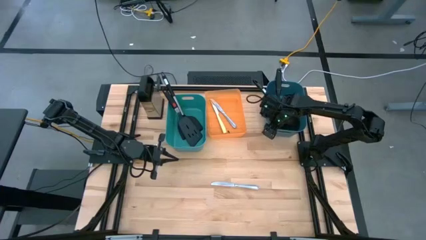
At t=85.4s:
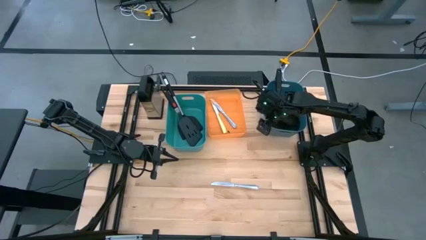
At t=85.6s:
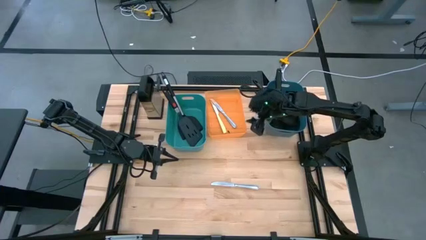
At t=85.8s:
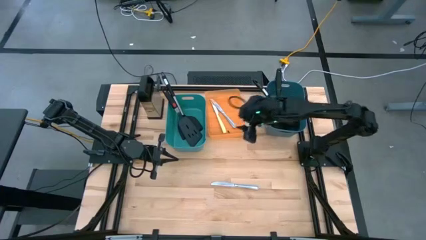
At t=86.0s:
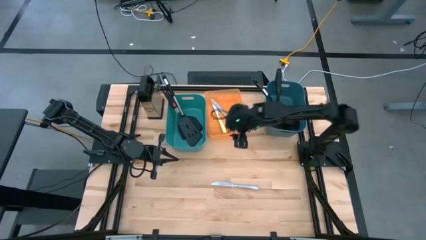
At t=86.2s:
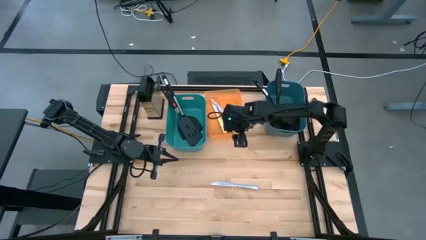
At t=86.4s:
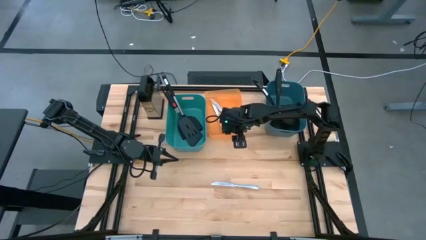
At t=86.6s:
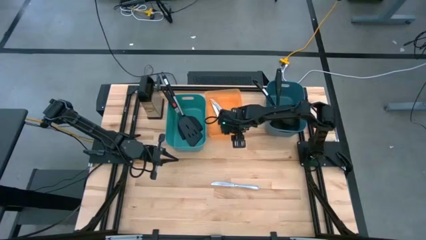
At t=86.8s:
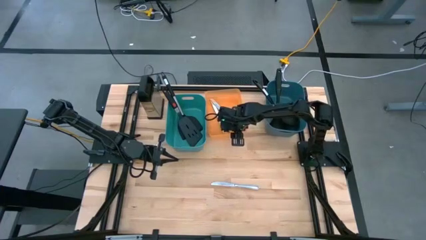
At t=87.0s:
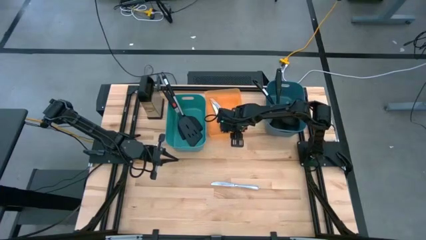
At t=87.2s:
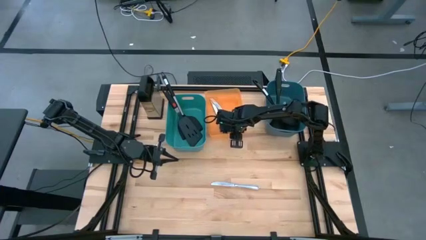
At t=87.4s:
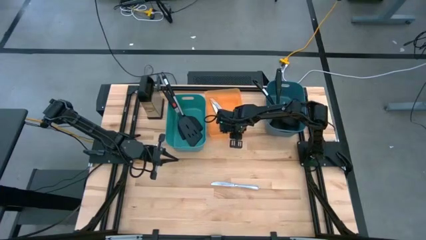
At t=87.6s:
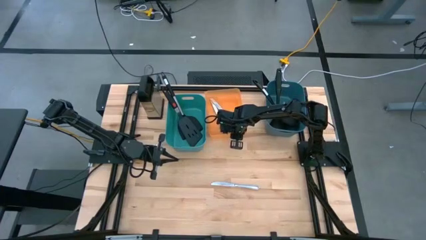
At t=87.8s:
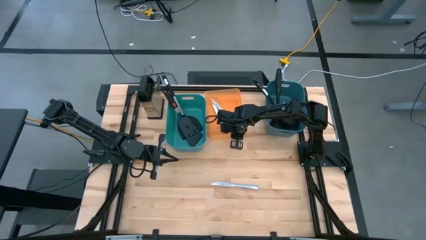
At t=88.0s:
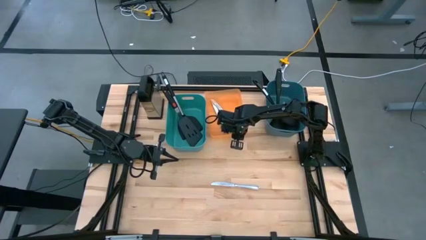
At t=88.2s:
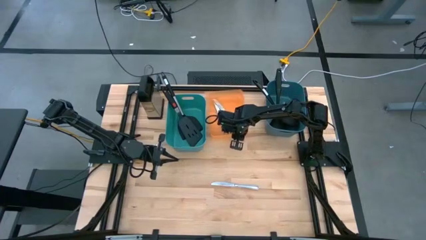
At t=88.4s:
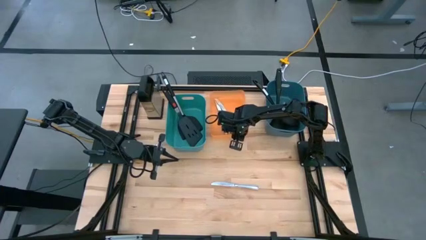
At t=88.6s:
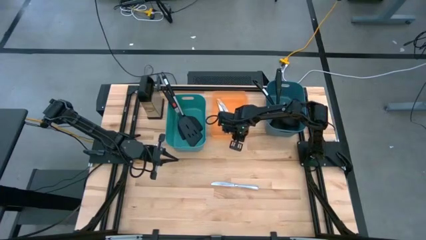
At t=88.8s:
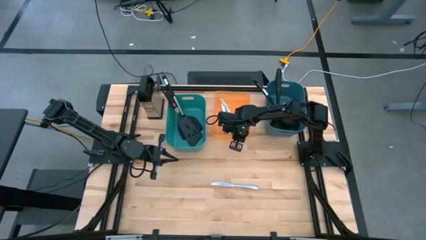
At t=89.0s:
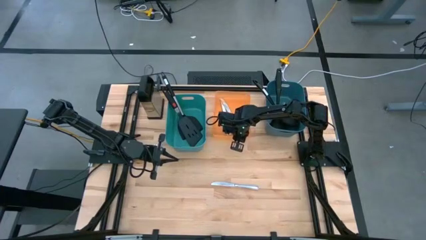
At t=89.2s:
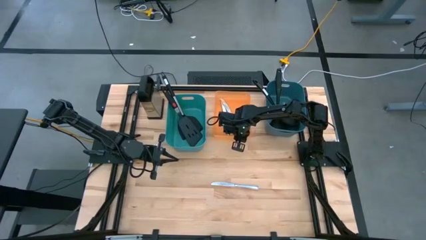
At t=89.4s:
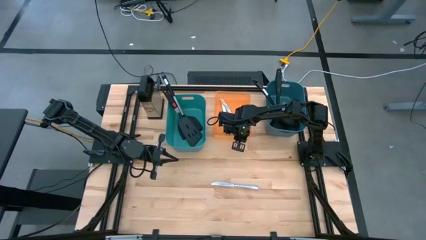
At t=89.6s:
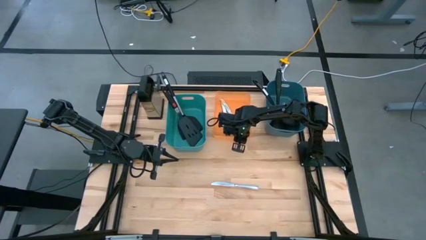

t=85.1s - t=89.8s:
Task: Pick & Place Kitchen Items
Adjust the orange bin

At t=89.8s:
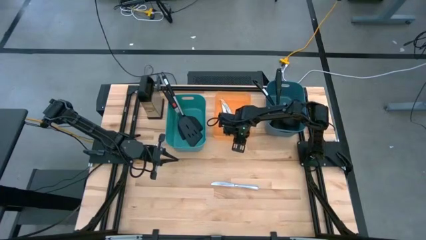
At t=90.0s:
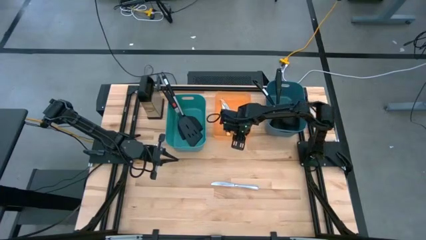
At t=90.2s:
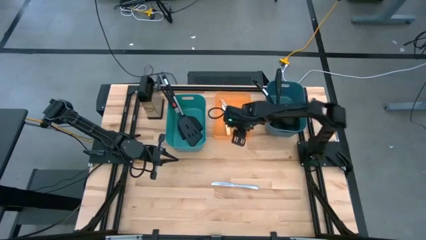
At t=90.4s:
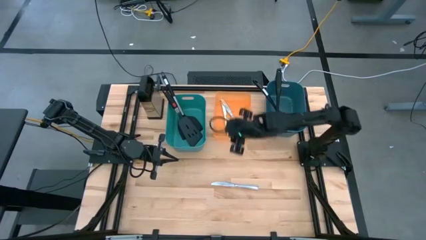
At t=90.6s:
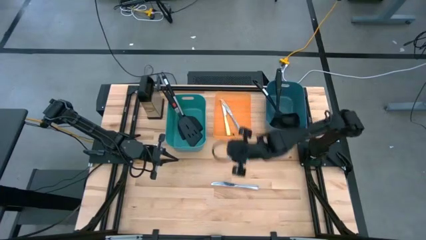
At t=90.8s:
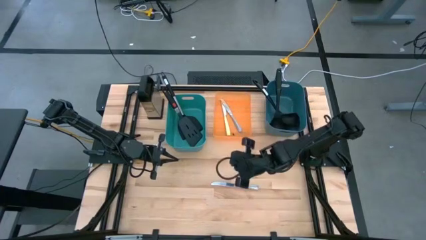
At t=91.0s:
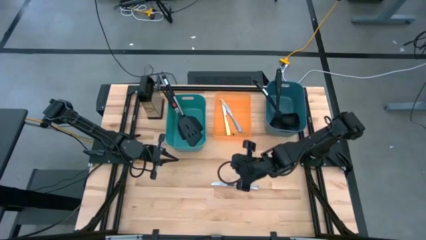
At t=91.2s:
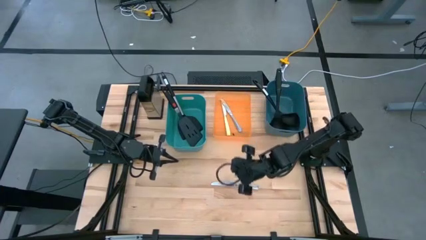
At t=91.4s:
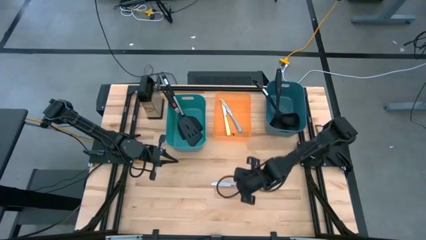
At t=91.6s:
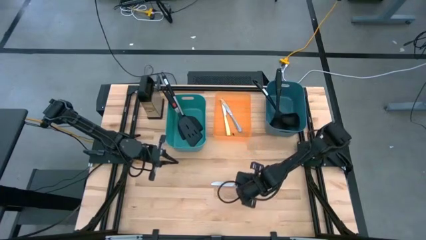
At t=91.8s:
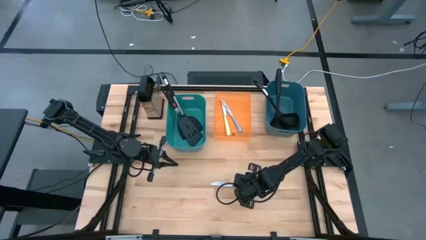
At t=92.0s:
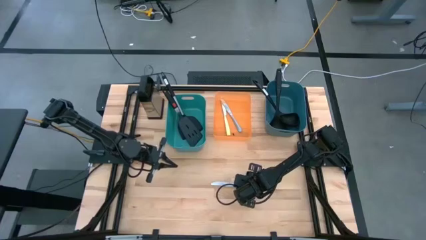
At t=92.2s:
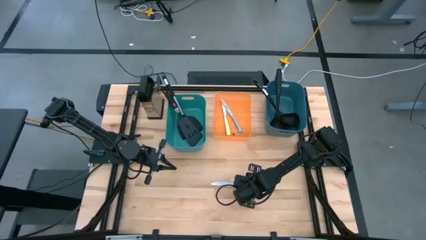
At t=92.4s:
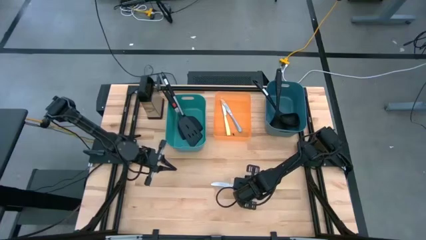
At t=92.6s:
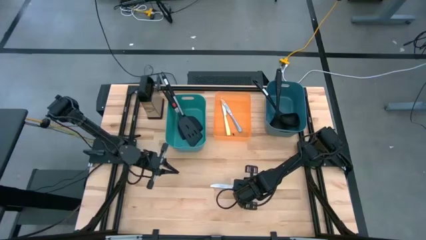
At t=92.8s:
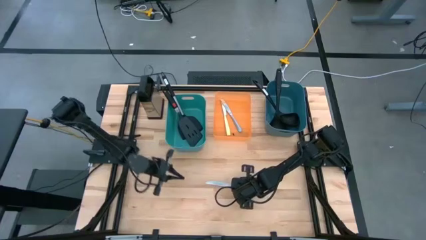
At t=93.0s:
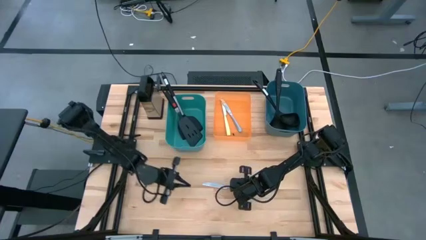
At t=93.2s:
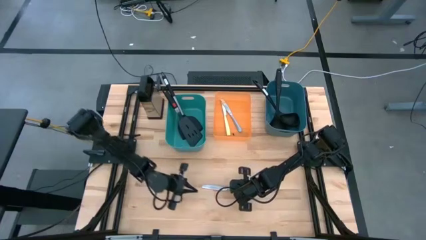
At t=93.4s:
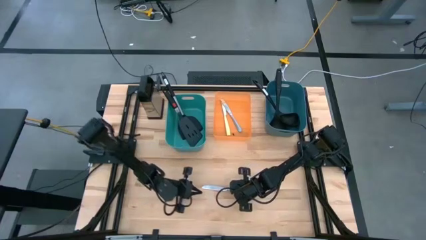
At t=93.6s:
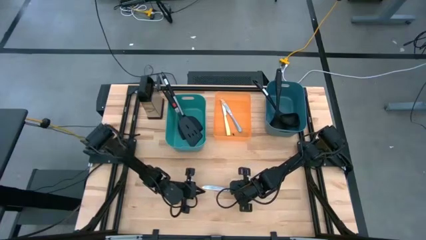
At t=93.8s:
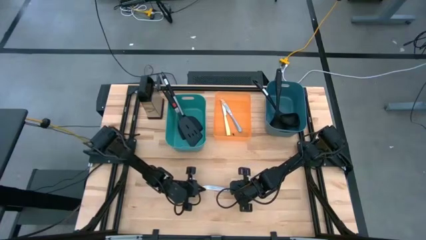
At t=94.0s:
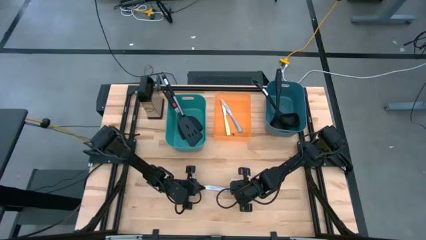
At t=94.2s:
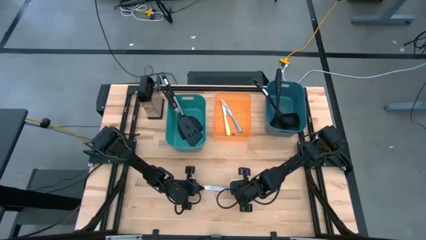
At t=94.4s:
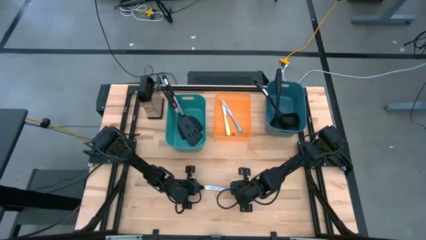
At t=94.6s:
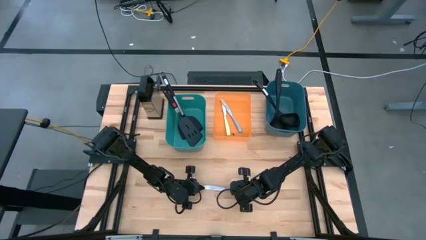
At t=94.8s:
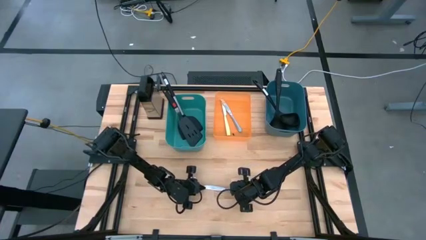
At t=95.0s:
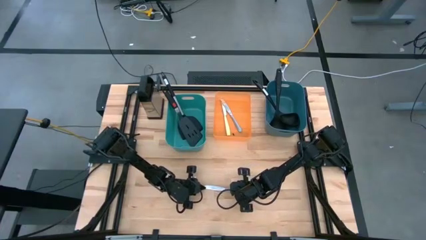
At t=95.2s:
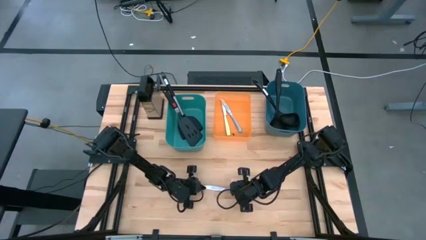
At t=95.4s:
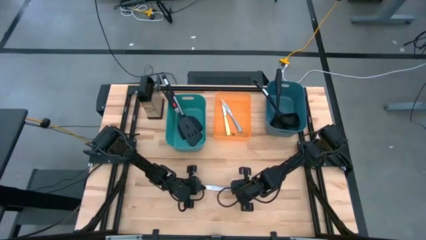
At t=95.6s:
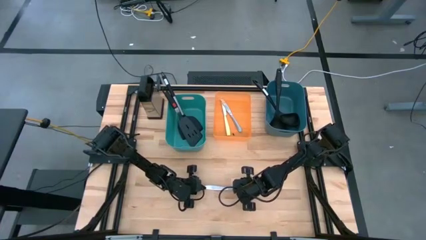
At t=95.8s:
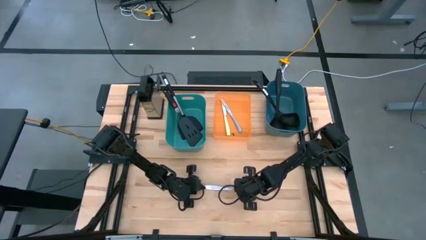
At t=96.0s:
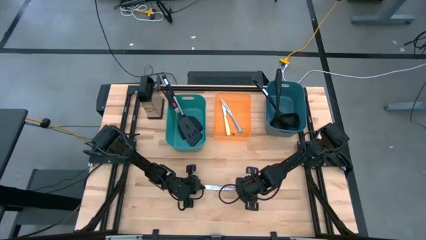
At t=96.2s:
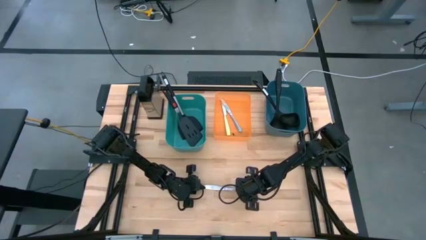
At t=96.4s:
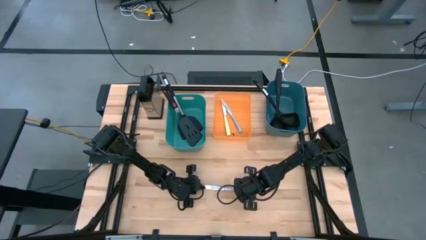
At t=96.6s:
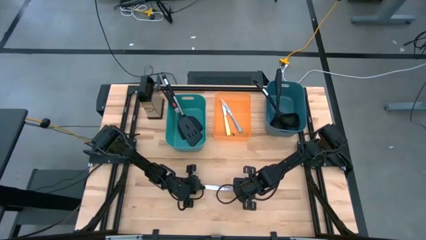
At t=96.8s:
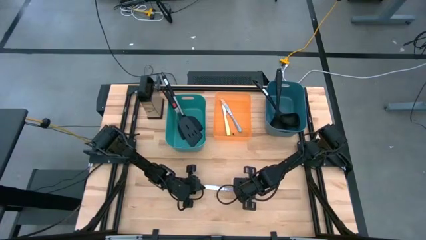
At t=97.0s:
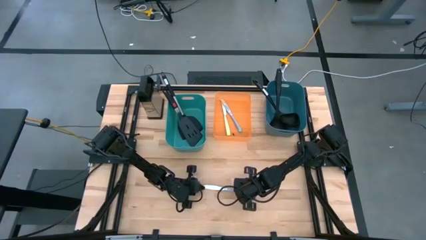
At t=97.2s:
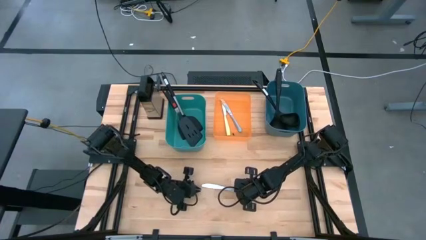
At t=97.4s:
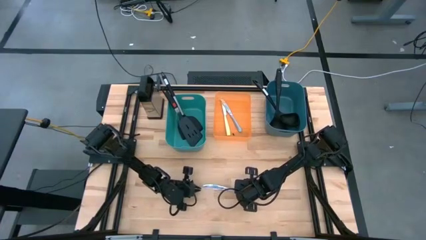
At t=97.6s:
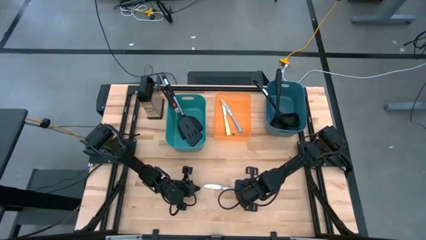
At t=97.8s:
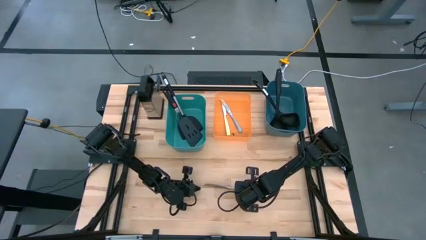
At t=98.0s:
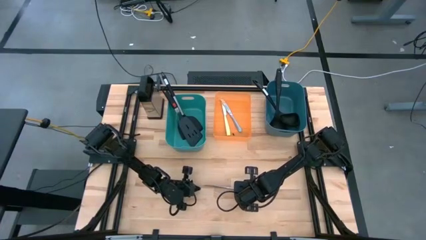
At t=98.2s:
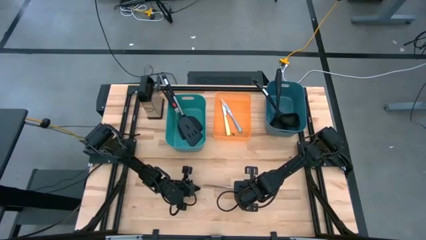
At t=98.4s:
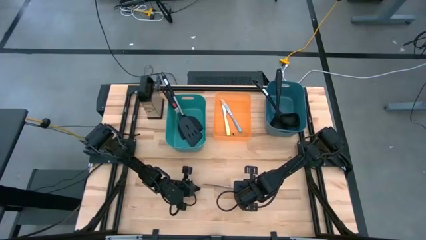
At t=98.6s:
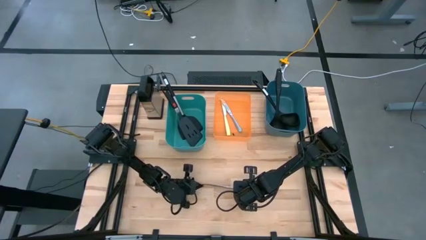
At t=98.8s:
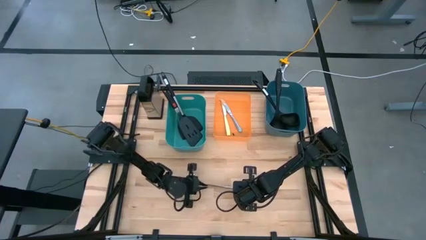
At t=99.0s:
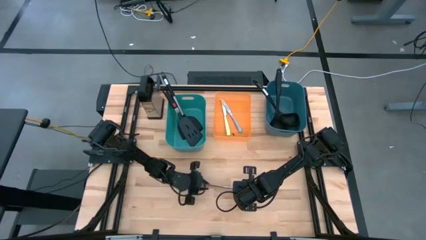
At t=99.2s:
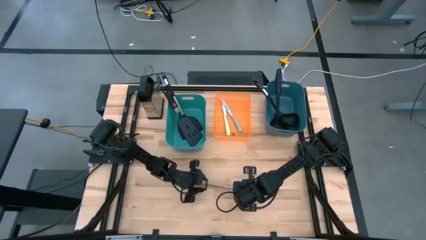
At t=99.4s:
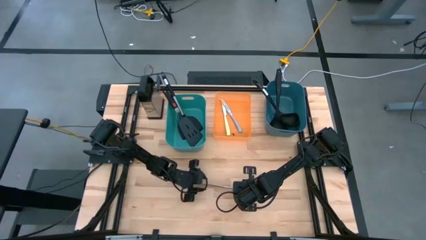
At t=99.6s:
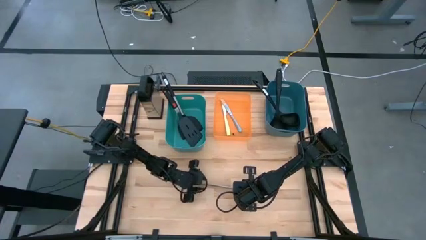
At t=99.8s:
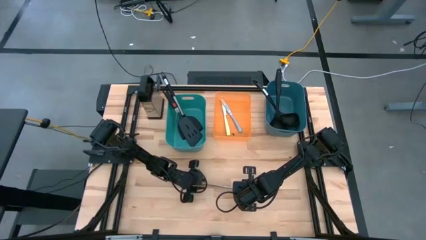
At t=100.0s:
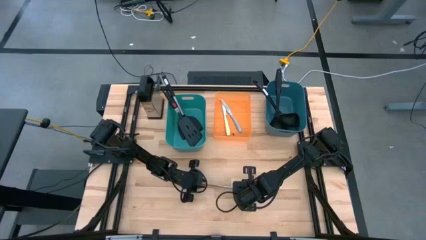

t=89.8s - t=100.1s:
Put the silver knife into the orange bin
